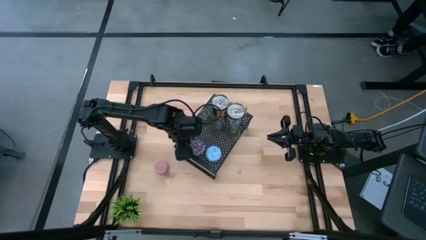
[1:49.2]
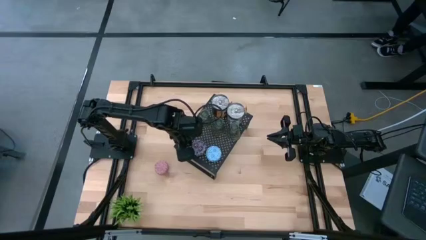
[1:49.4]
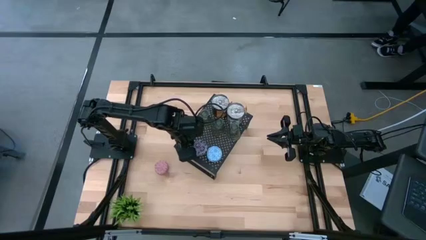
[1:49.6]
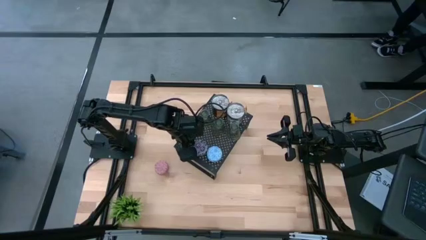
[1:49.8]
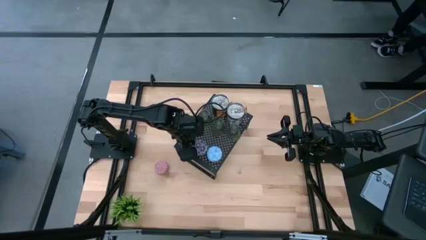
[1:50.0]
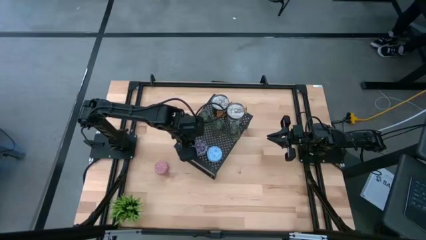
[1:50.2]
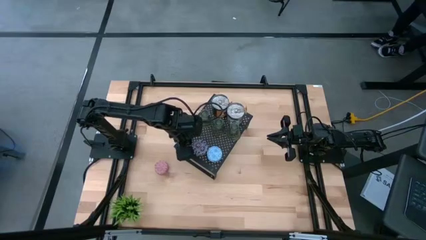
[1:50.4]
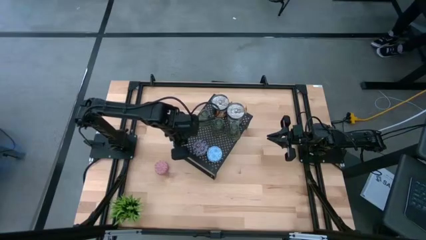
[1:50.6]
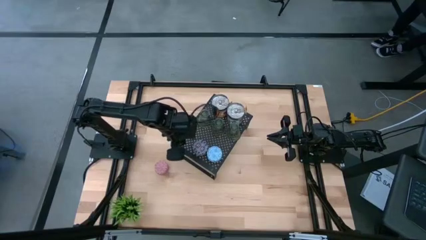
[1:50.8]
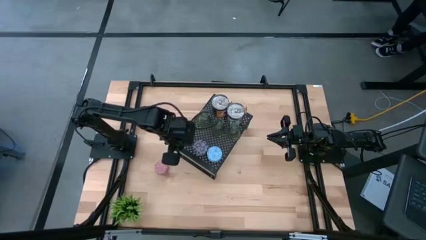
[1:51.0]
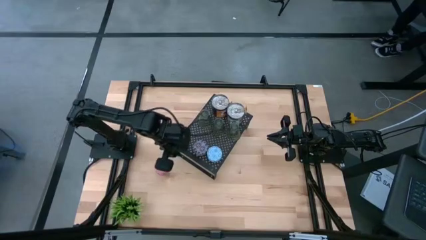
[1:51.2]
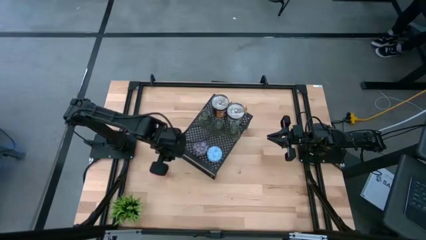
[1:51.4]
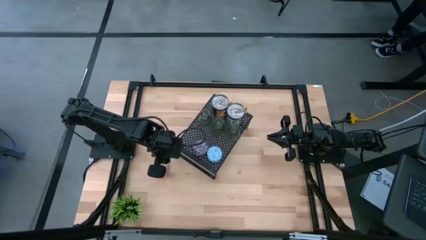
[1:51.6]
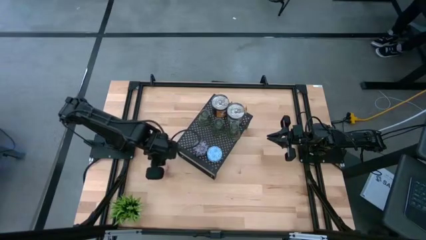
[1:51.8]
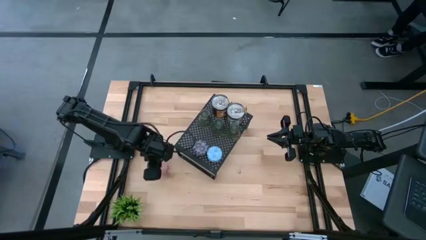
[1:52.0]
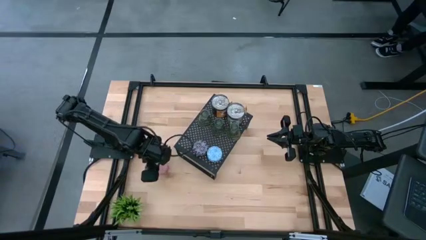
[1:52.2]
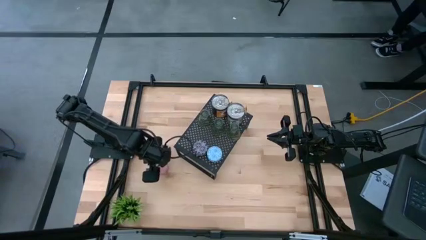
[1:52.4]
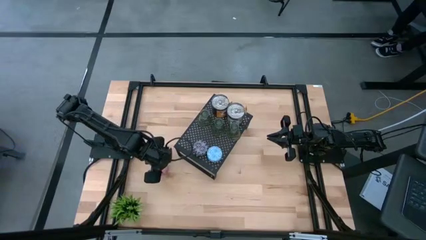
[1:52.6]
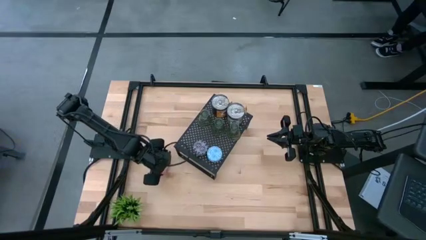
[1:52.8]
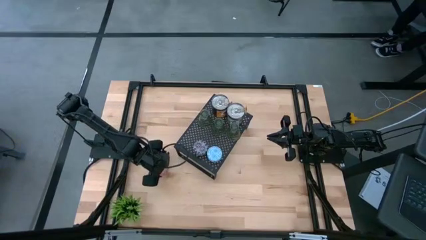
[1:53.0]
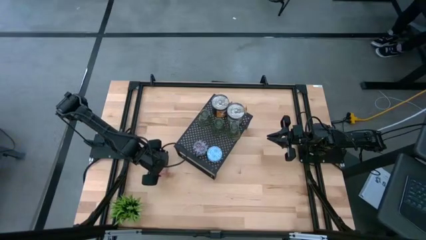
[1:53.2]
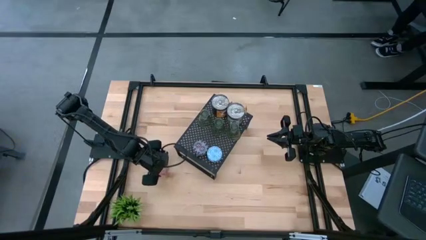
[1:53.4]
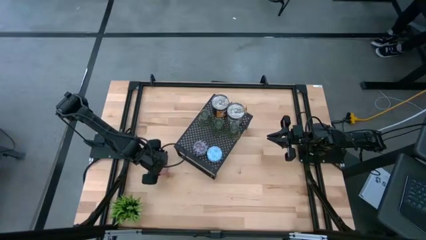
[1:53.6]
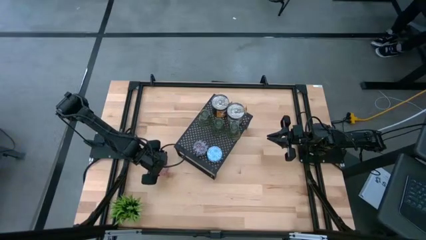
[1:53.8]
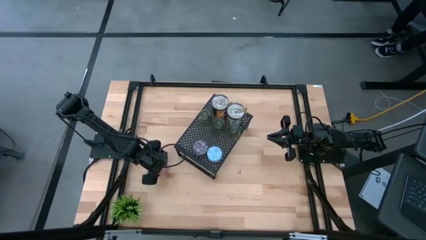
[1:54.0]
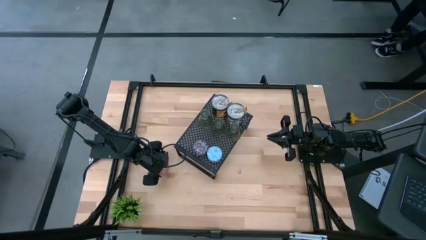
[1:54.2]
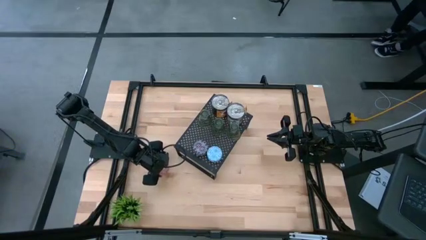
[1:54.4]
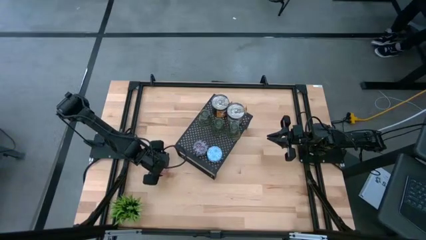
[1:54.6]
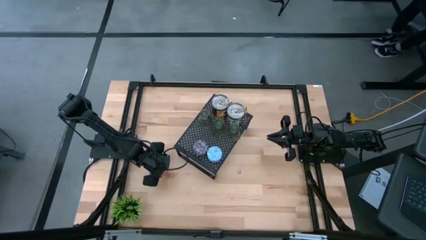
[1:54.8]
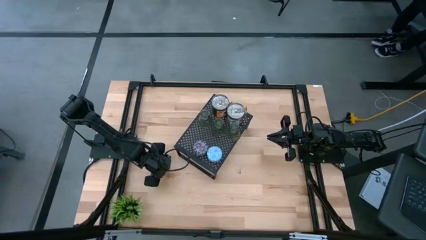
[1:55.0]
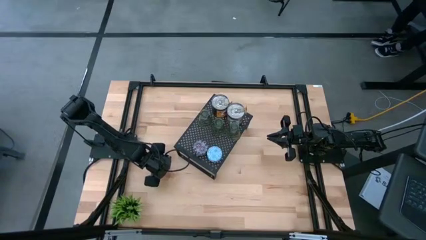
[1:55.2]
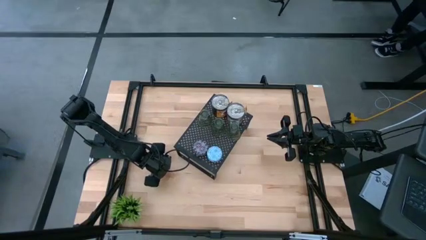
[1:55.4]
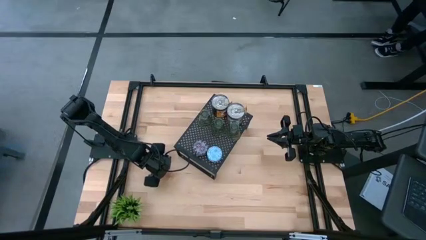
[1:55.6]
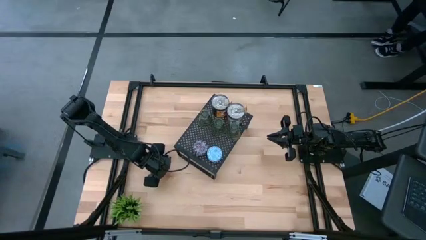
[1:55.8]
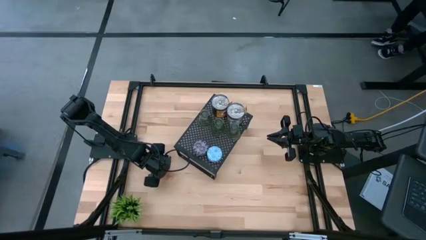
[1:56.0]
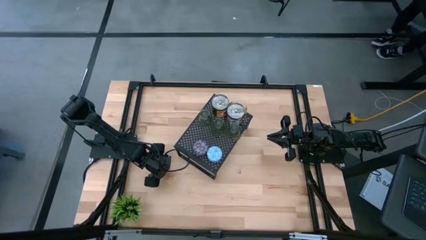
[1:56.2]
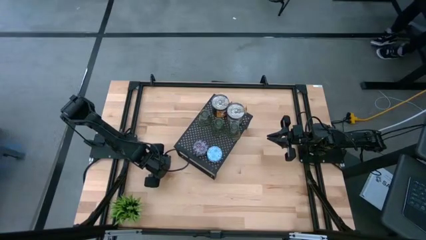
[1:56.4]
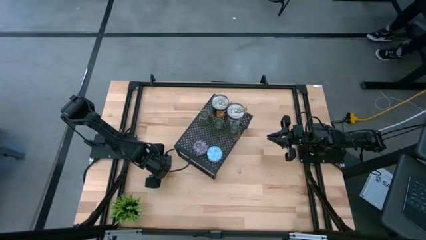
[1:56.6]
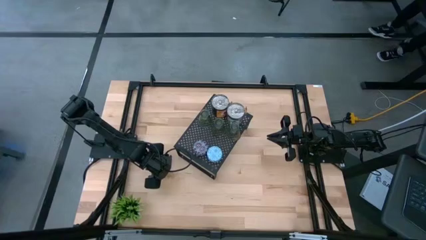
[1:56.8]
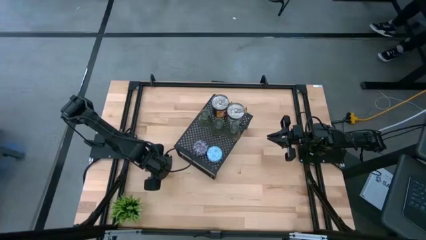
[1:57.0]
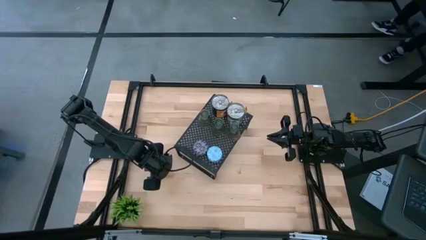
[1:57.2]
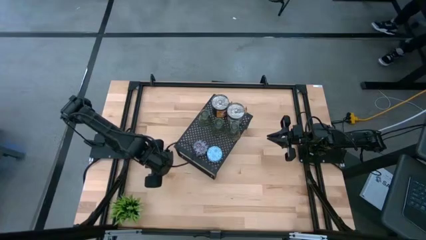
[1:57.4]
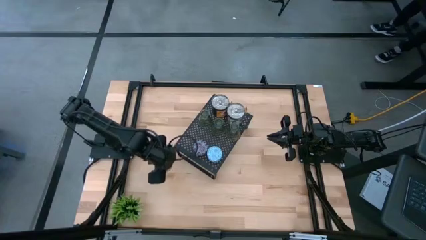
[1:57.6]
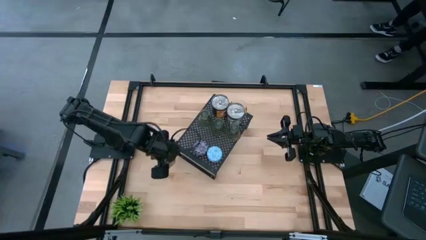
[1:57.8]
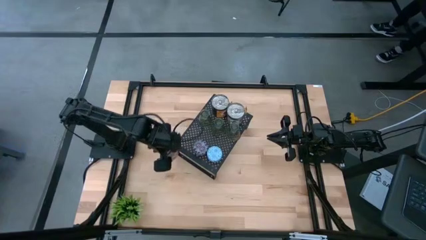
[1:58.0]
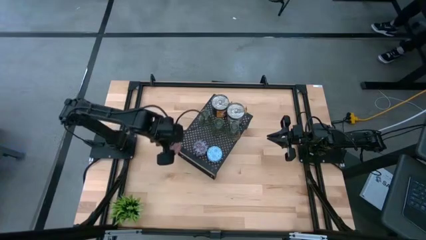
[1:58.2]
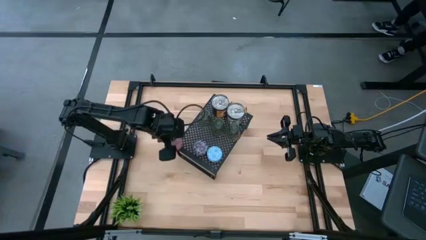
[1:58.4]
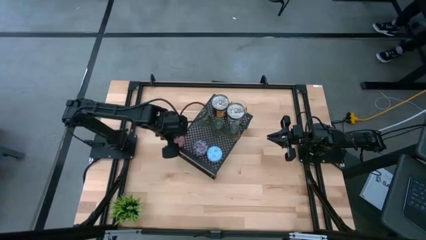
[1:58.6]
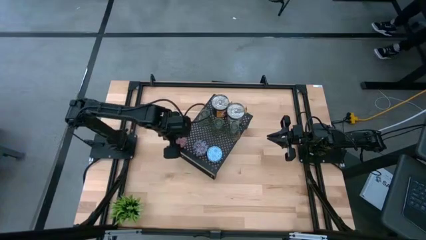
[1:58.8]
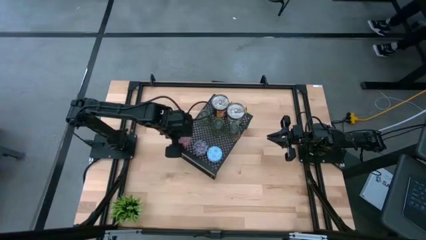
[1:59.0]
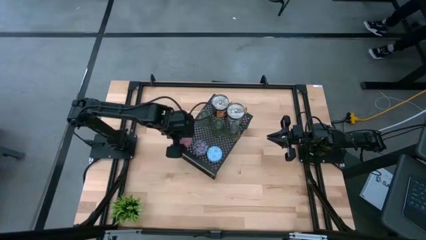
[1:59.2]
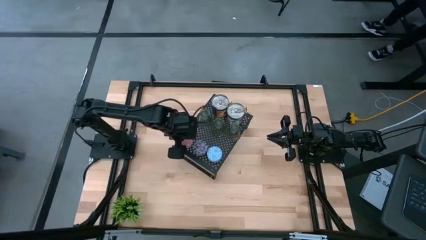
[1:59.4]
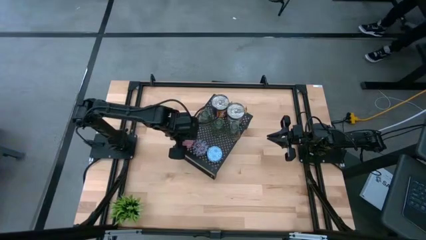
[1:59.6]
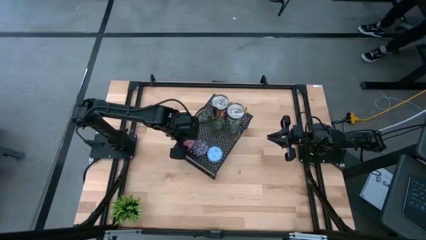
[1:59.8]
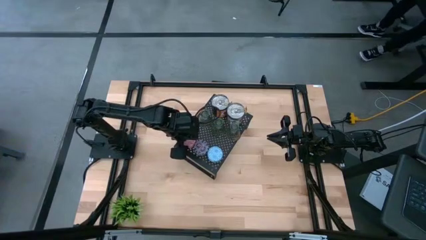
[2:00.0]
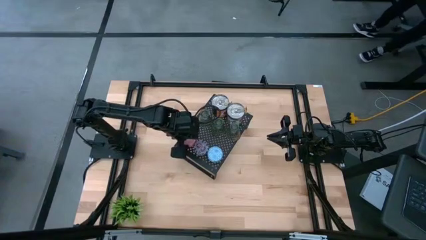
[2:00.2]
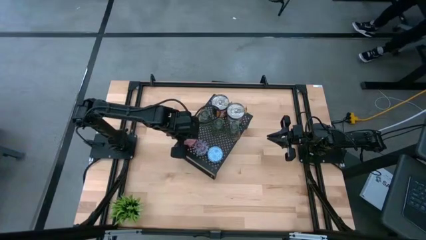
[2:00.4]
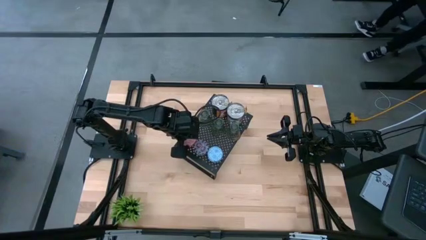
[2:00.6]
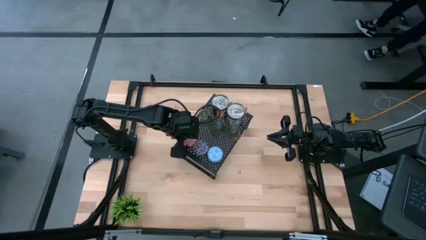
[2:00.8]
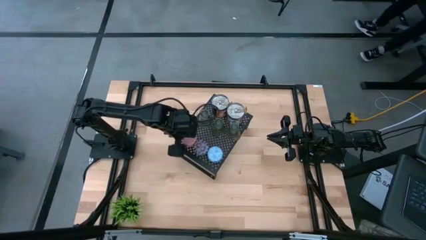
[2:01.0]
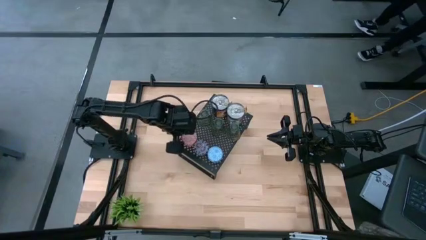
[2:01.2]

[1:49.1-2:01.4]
Task: Pick & Place candle stick holders
Put the pink scented candle on the shelf

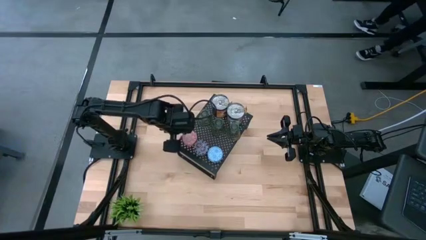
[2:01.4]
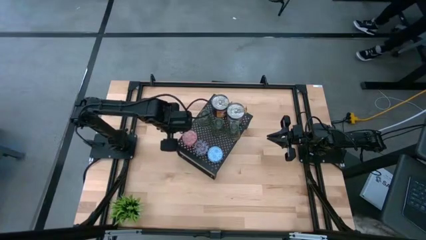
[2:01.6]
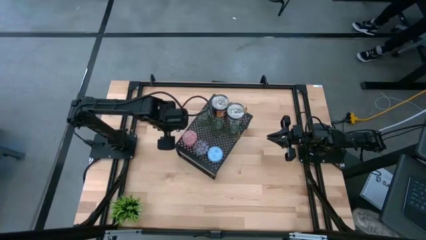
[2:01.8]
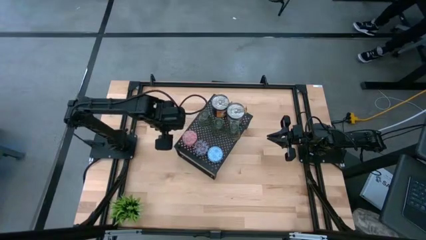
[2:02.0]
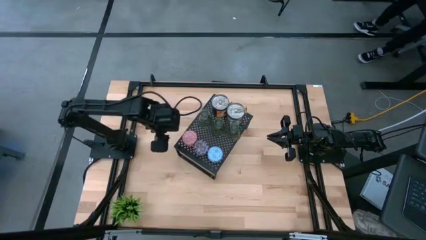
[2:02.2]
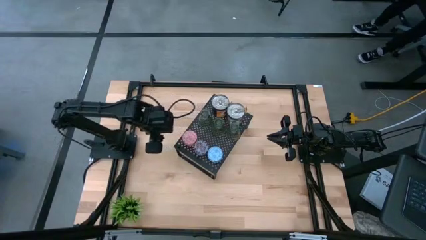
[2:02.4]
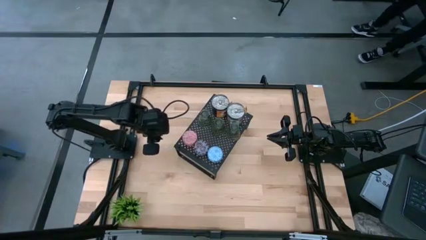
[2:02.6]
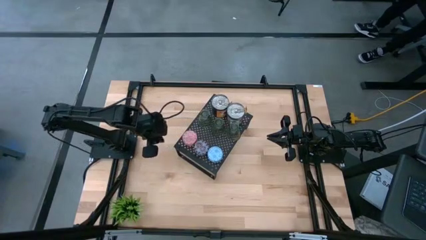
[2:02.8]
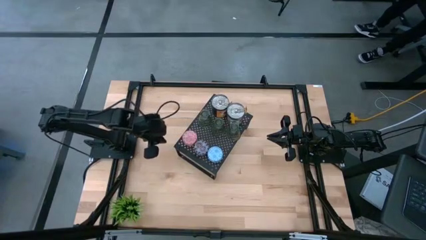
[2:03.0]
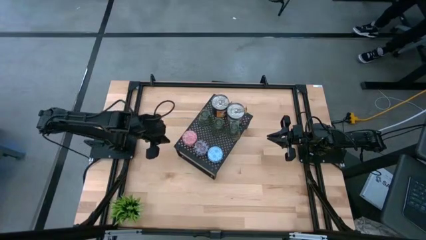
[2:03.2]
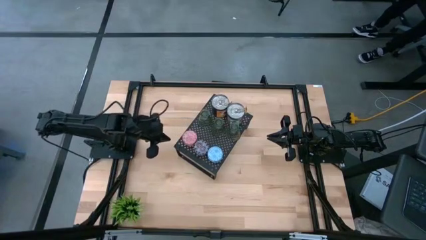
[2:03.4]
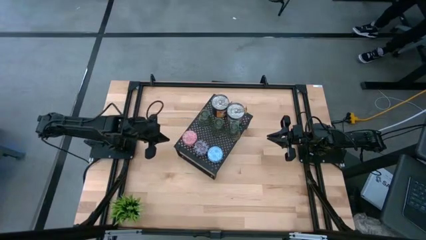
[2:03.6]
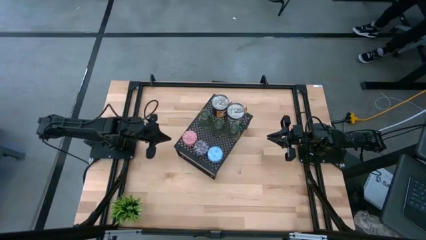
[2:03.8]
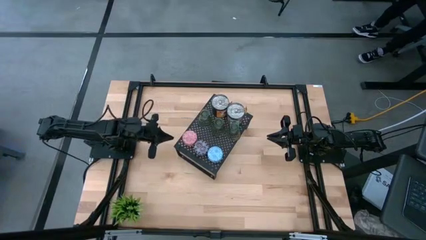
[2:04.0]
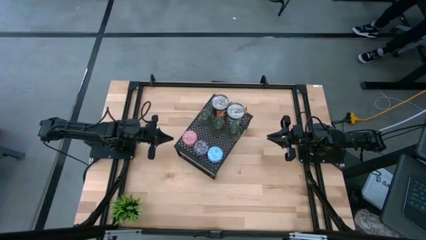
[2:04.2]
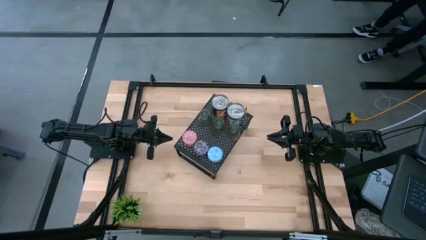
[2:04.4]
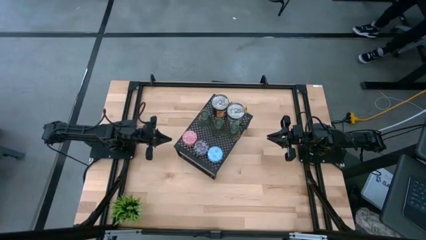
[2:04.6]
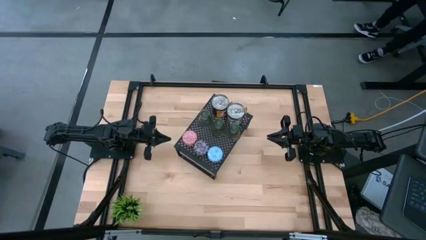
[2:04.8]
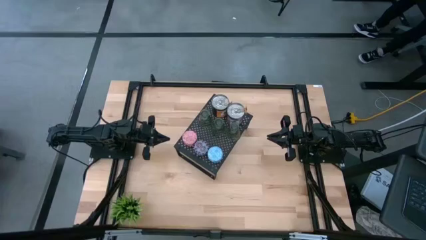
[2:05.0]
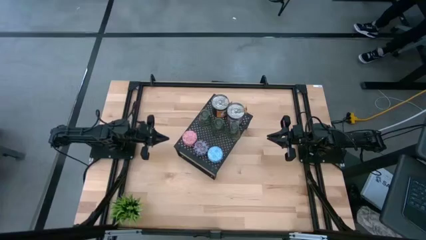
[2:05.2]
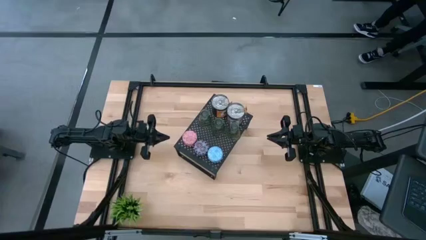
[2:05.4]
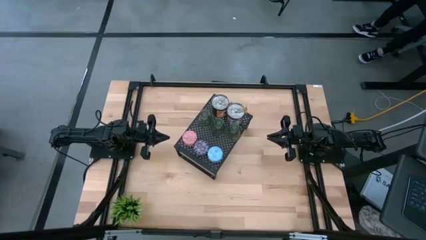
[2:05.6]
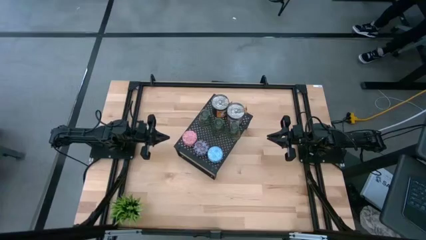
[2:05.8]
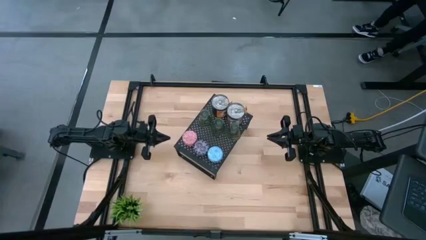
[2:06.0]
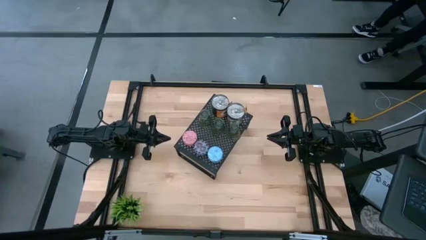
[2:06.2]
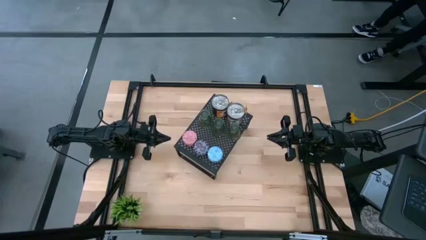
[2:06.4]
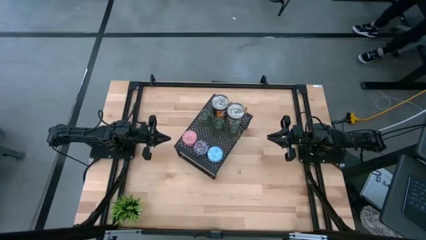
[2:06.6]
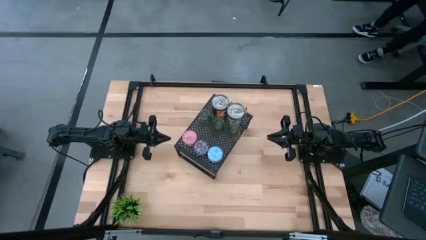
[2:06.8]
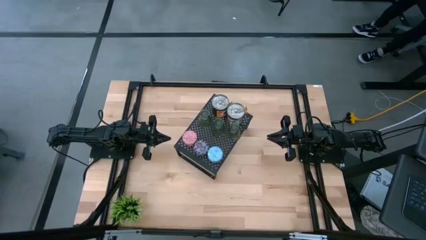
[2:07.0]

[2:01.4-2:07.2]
Return to Home Position
